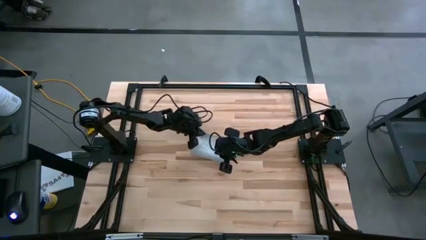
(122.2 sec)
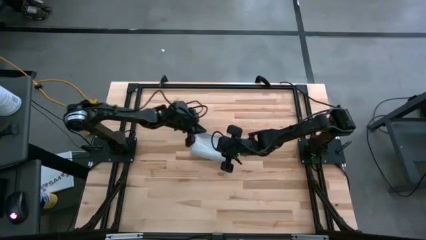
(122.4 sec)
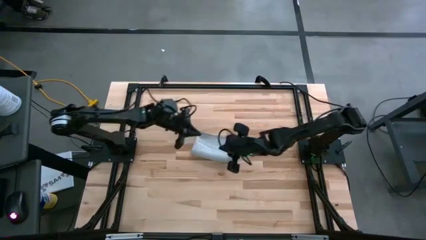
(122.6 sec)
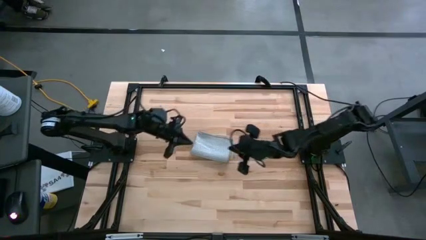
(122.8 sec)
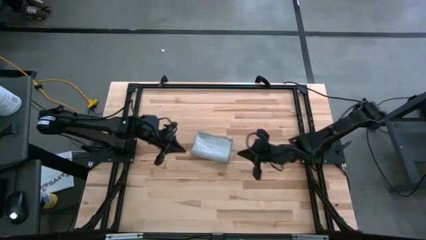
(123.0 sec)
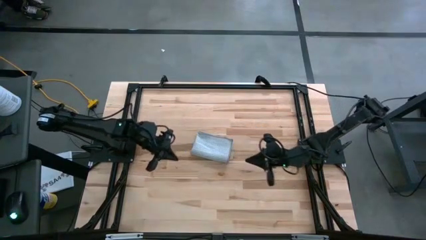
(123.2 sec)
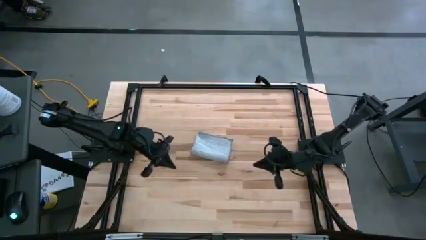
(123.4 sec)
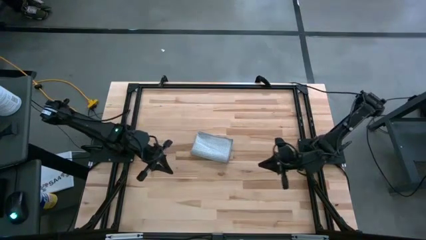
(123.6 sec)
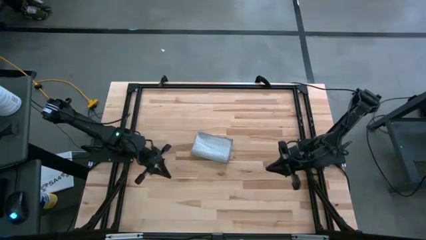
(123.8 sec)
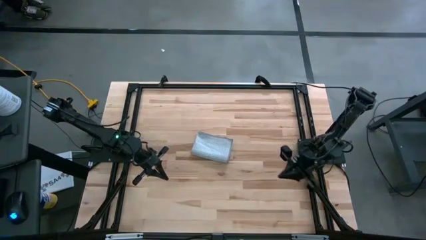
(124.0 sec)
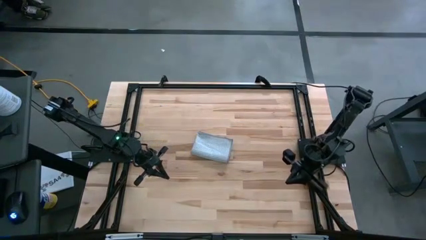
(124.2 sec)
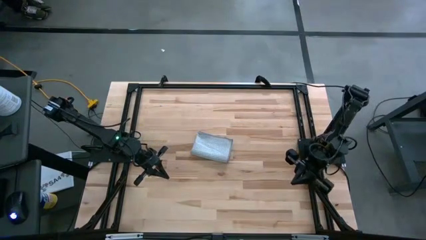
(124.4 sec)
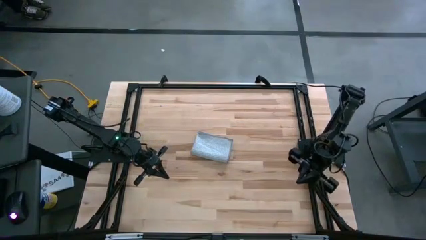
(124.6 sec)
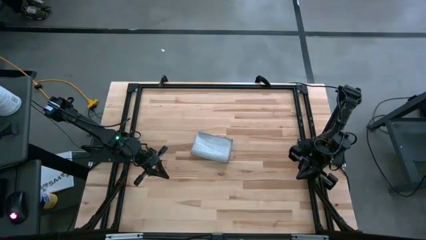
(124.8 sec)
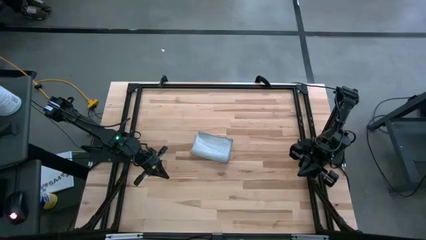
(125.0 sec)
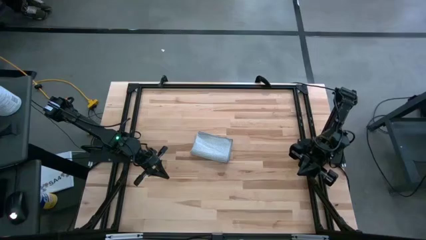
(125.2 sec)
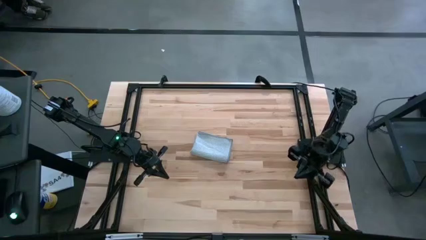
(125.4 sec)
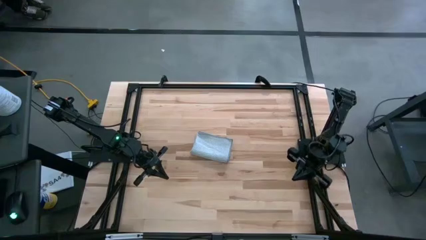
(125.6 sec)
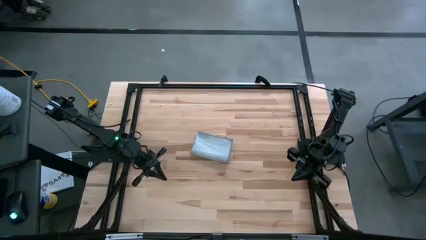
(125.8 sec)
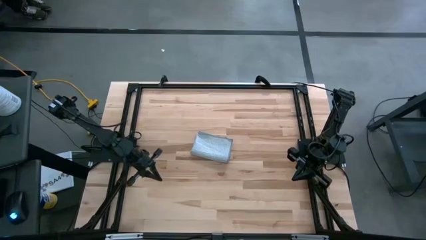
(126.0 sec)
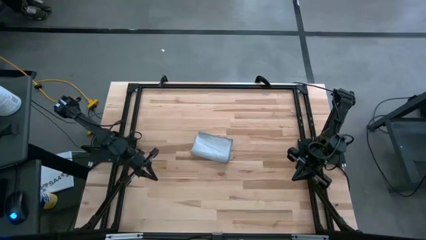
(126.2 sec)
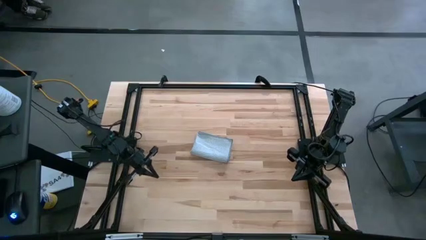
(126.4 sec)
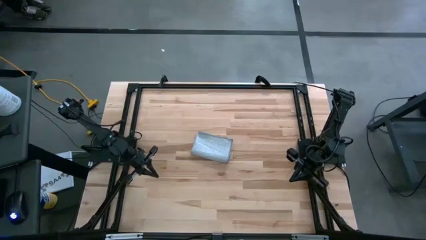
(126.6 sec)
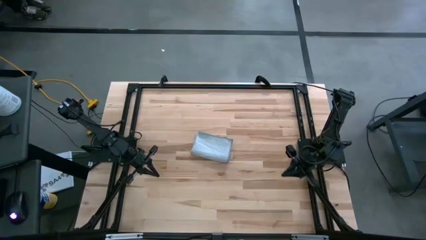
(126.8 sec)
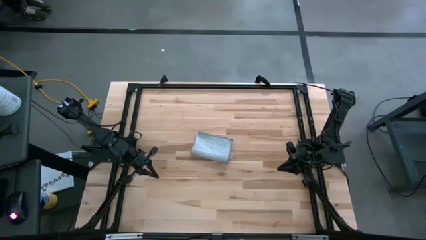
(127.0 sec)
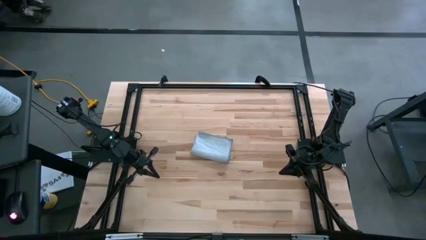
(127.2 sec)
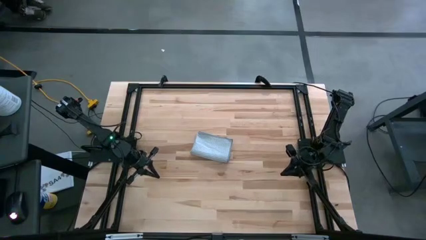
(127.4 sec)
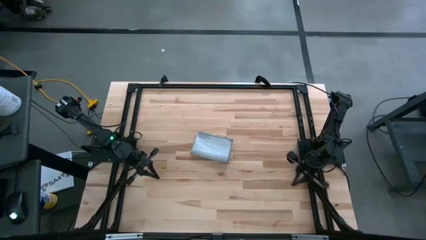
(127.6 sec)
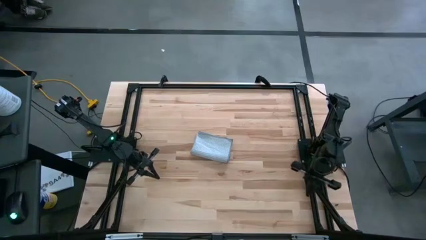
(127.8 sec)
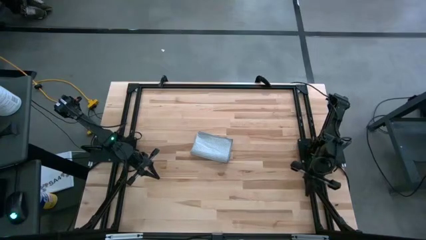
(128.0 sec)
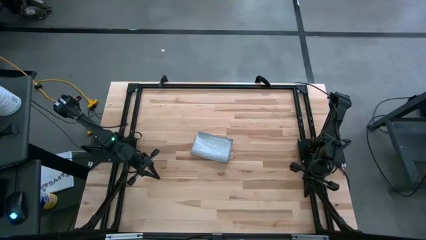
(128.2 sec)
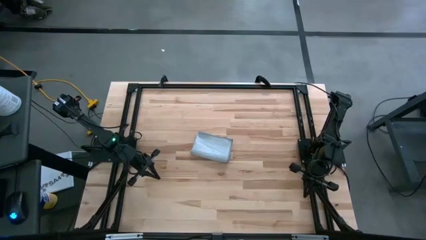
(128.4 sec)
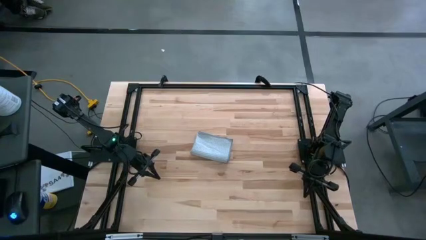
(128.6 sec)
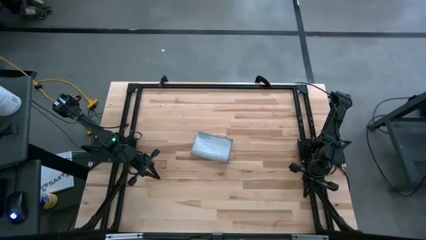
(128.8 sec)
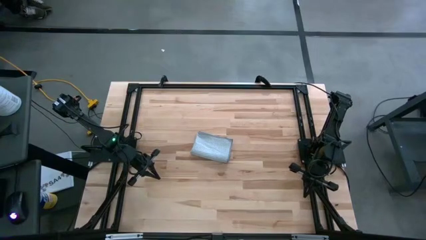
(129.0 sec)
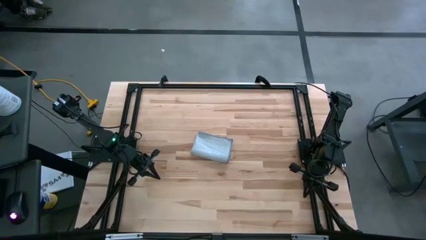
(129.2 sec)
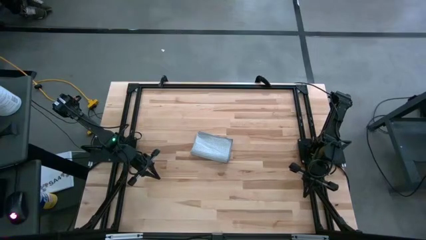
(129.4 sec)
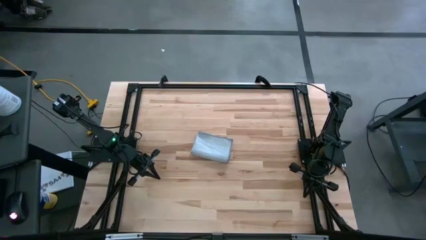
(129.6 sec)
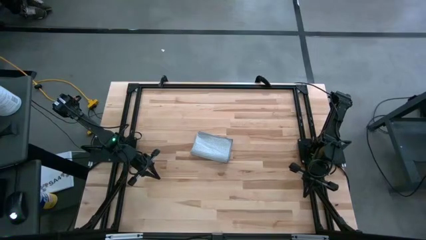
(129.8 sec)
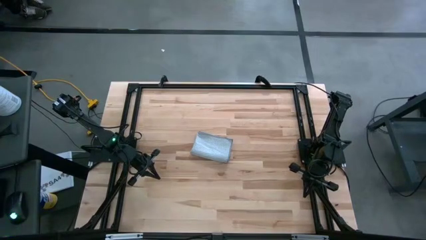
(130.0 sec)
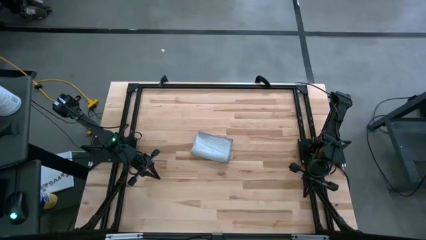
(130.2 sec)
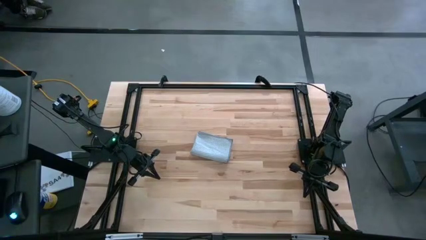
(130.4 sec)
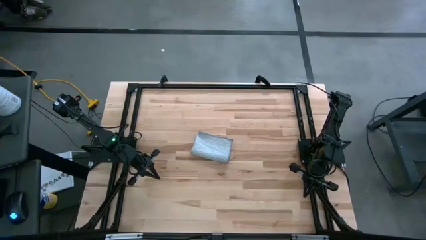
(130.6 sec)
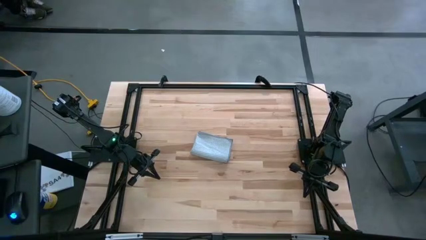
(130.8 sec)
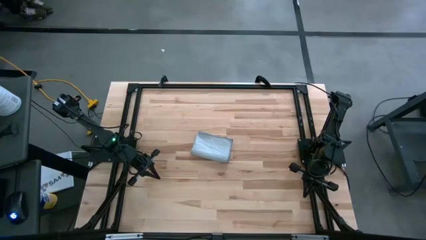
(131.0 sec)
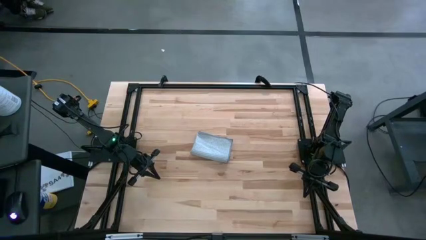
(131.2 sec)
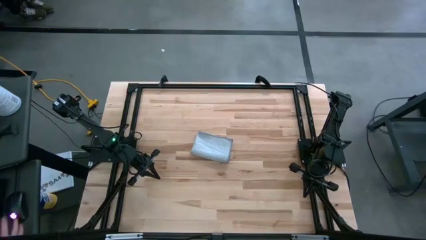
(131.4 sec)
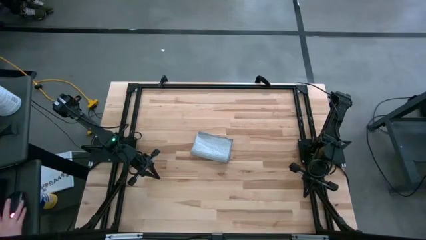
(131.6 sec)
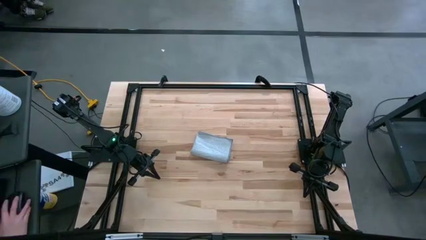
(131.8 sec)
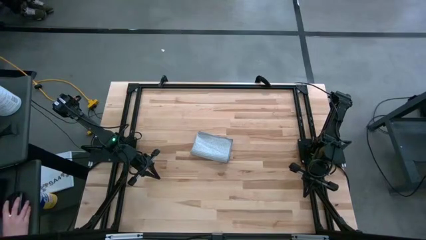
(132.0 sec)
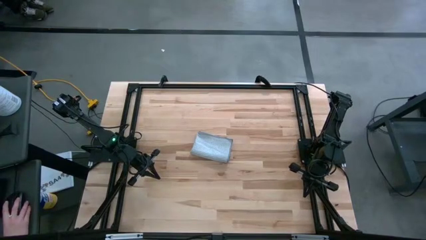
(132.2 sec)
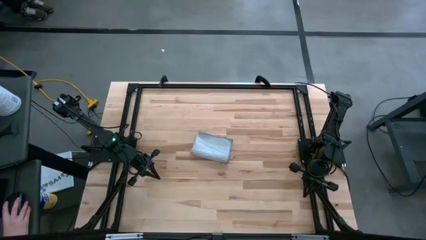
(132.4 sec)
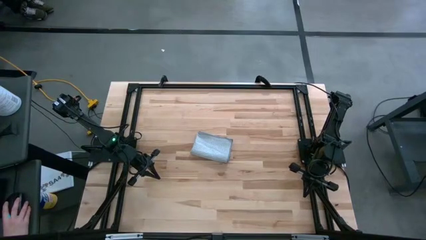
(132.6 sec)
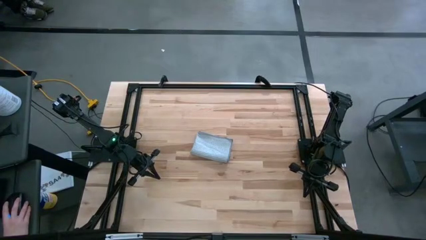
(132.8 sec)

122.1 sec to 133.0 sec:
Task: Fold microfiber towels
Return to Home Position
